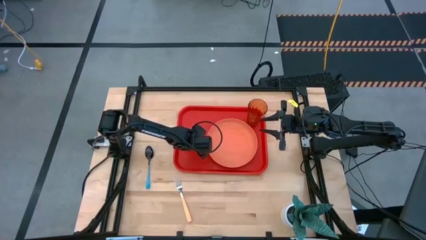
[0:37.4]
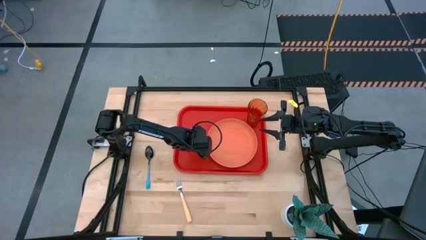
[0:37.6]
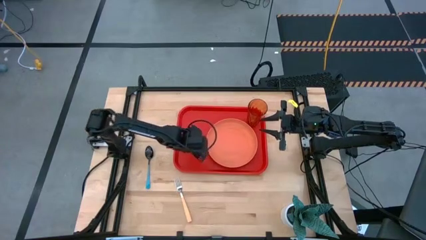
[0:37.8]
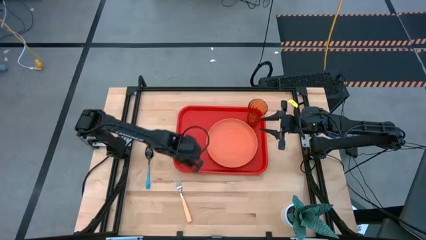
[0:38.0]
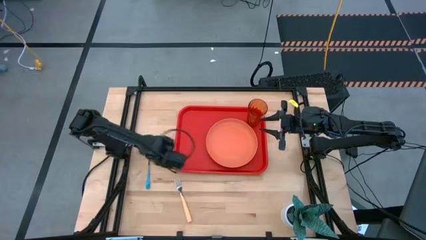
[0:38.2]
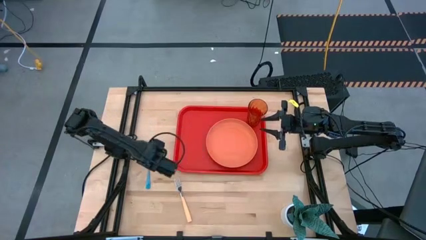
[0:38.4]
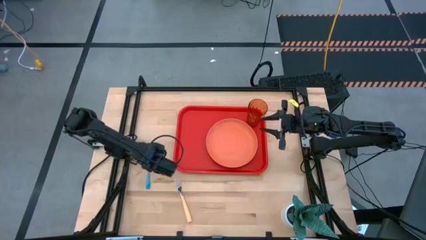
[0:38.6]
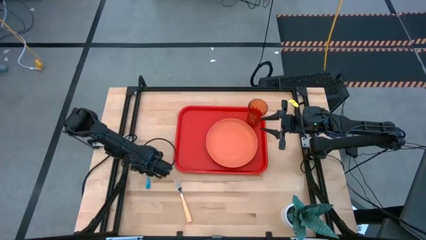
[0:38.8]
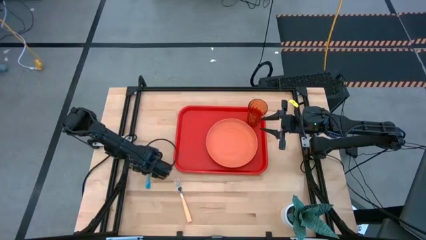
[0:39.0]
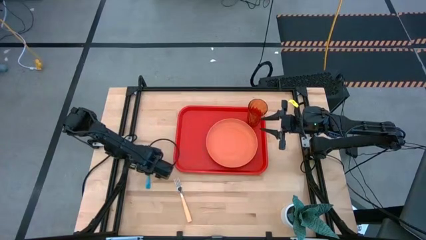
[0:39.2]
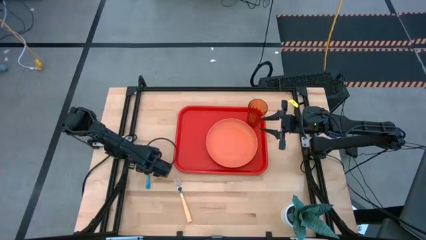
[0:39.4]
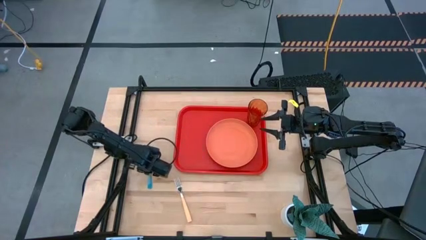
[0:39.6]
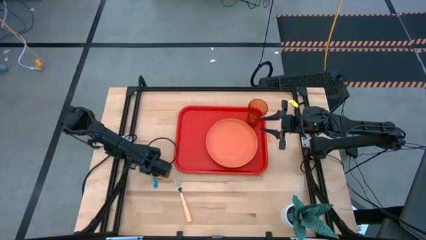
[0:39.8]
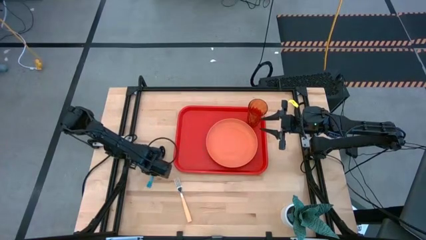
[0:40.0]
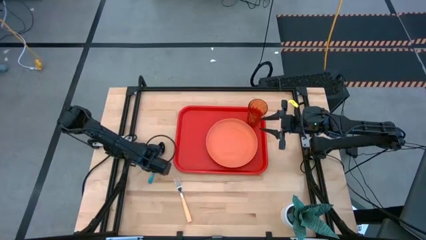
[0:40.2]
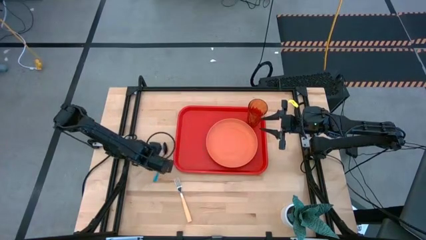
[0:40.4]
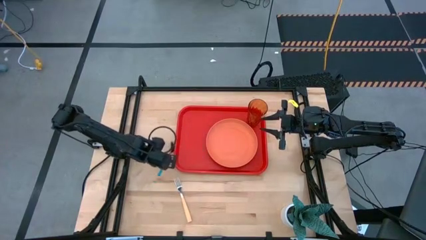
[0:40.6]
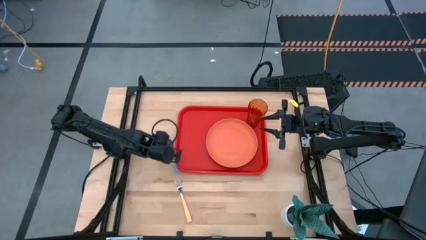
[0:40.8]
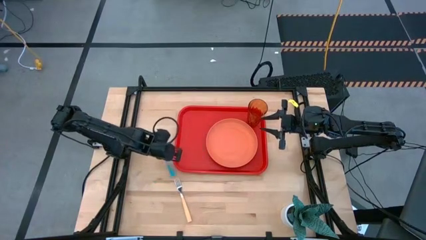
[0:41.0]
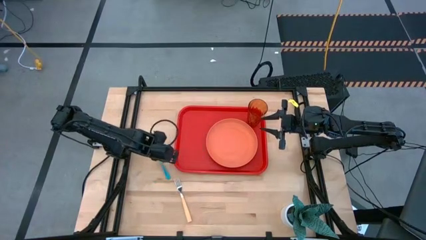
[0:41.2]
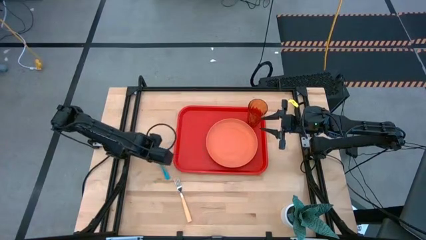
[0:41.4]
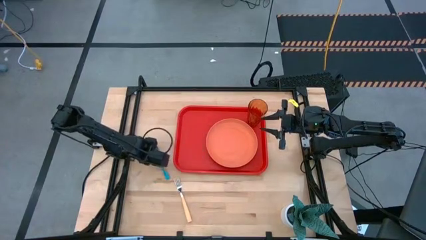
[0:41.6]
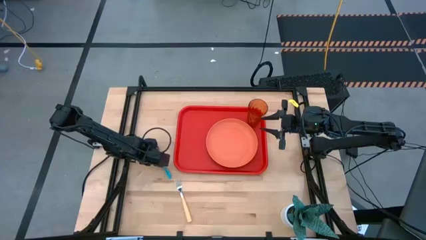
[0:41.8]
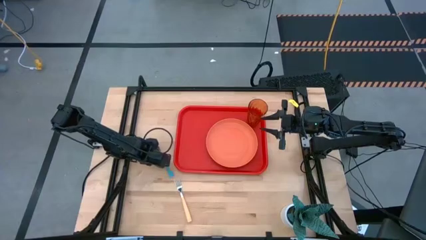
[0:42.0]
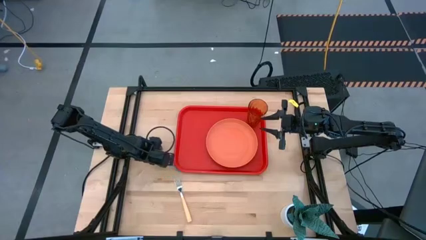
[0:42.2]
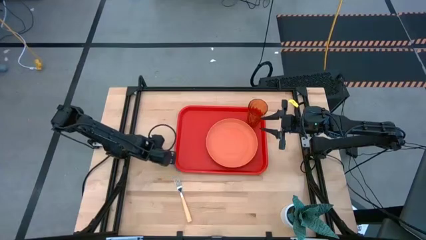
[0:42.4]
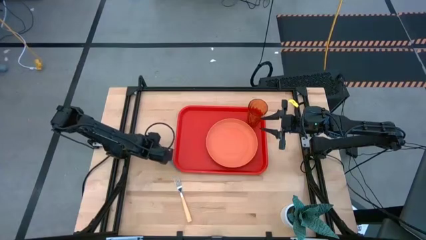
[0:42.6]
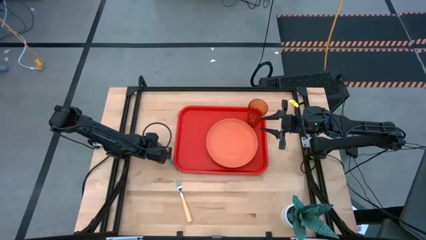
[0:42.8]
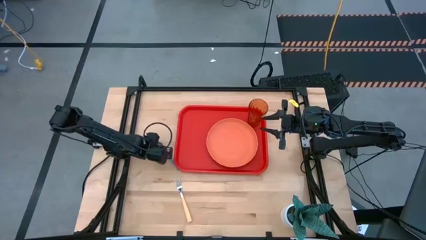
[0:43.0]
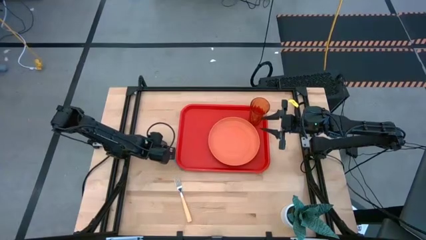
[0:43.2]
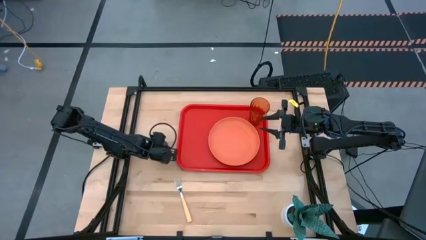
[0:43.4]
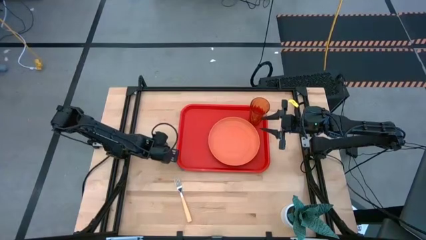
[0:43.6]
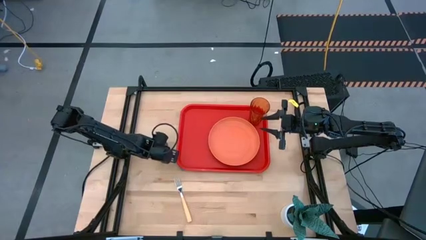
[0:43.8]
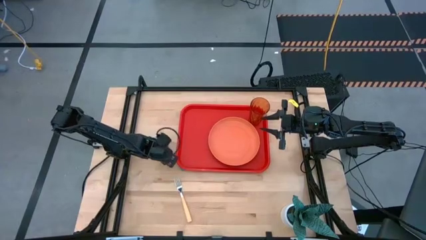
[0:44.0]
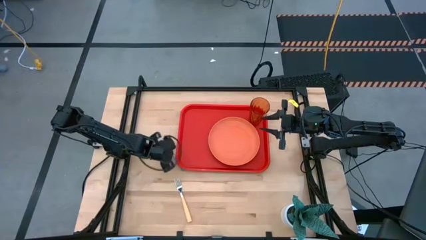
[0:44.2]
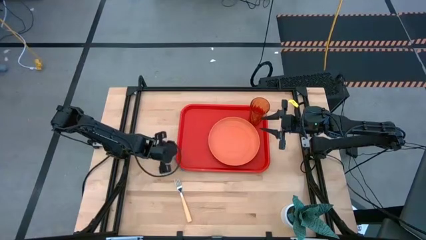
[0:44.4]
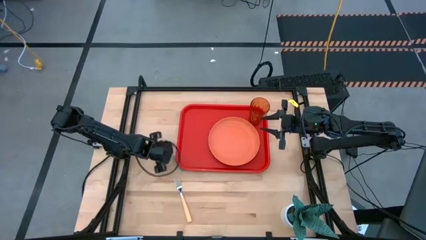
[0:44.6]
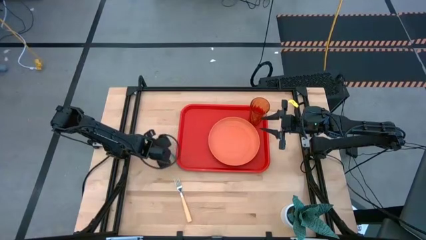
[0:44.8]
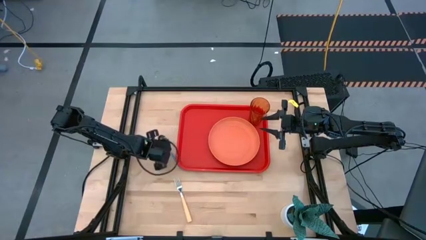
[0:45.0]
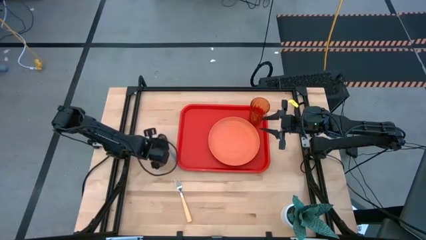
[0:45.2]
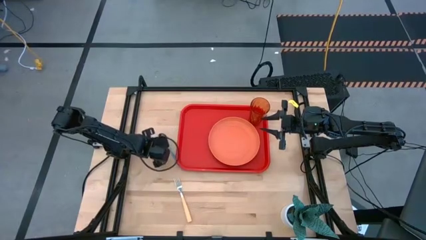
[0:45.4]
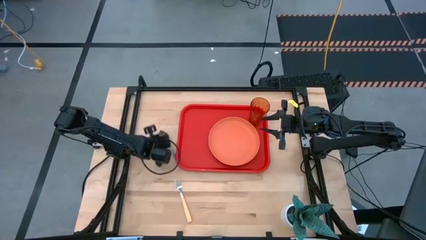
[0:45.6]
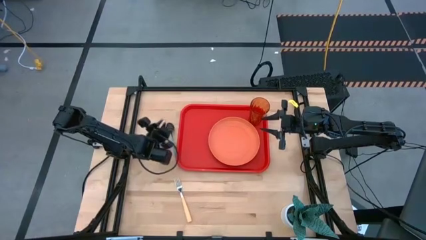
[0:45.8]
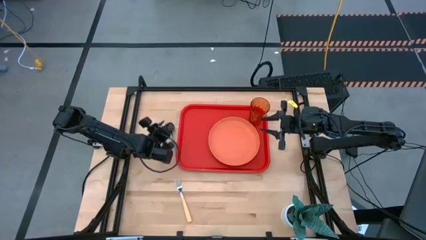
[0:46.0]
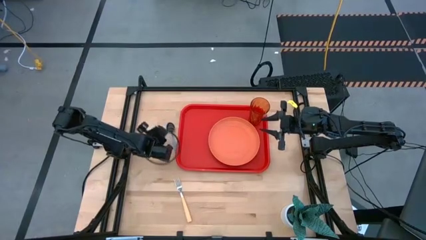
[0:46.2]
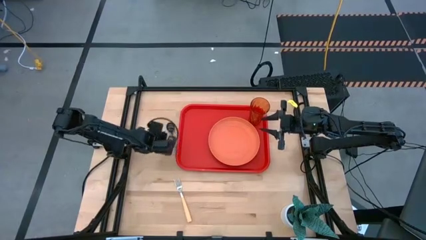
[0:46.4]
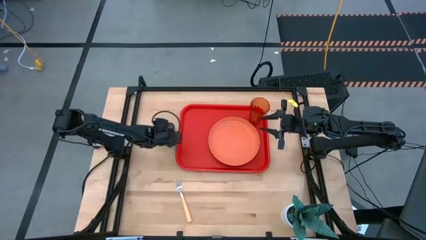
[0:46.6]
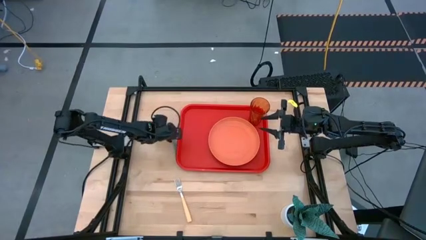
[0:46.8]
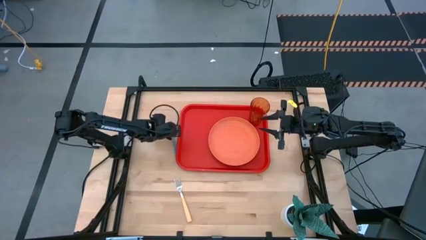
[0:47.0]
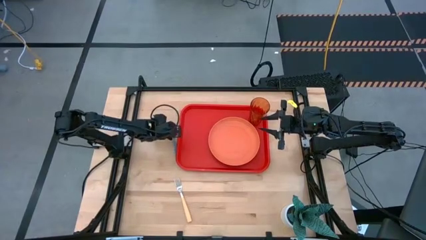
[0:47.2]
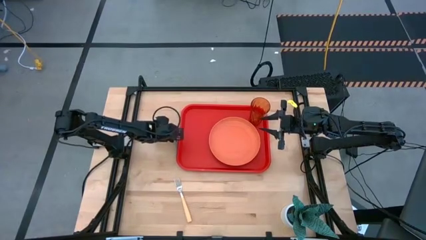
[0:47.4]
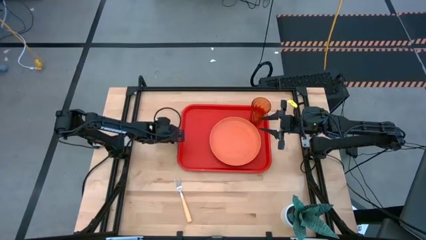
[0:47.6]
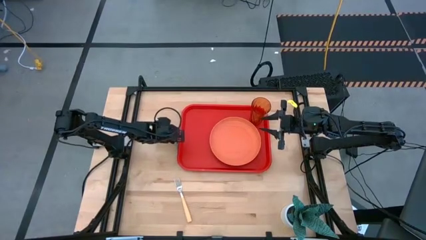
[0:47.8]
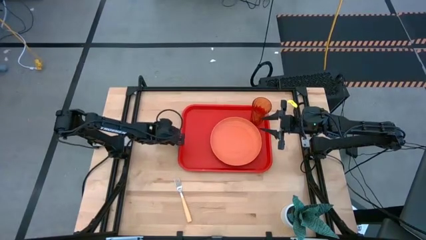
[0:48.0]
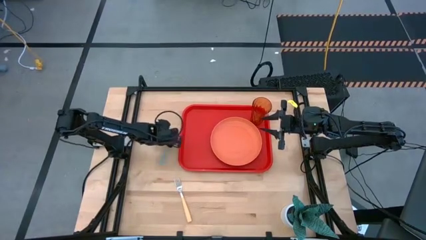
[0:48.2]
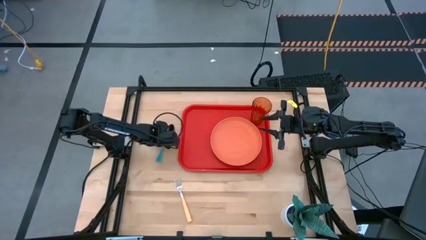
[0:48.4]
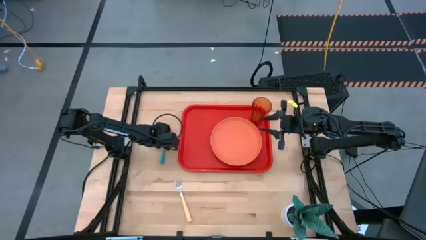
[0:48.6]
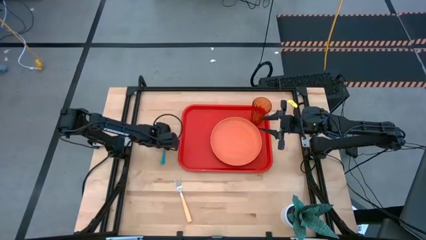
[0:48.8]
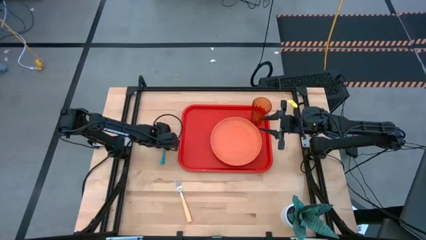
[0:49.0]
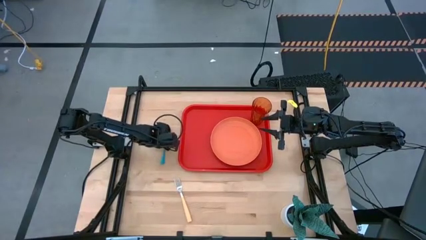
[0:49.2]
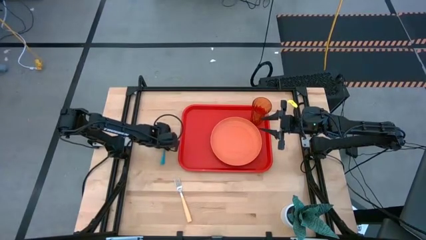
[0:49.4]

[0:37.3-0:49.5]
Task: Pick and place plate/cup/fork/spoon on tray
Put the blue spoon on the red tray to the left of the orange plate

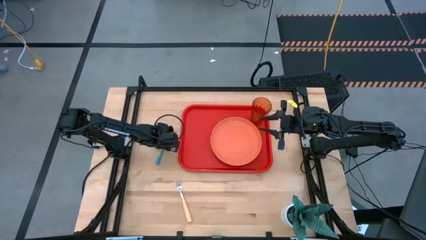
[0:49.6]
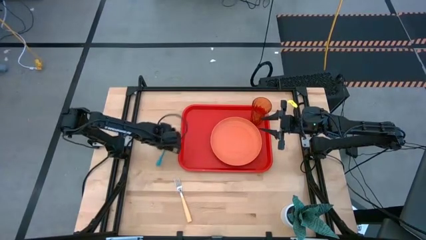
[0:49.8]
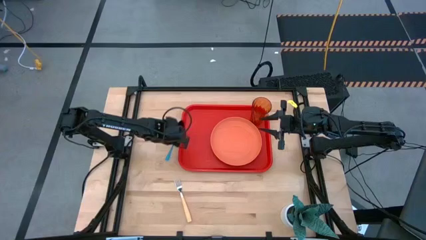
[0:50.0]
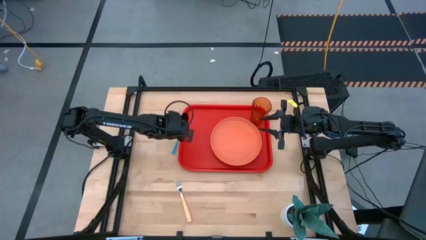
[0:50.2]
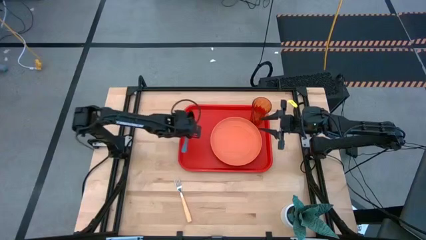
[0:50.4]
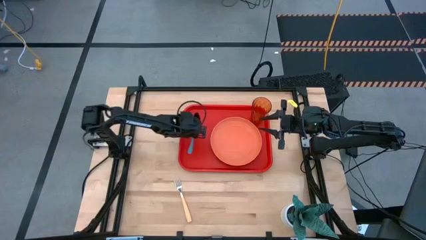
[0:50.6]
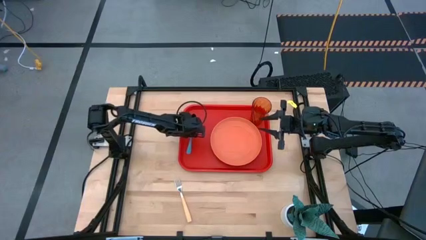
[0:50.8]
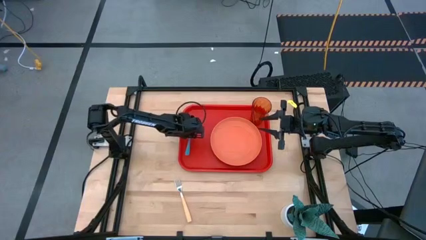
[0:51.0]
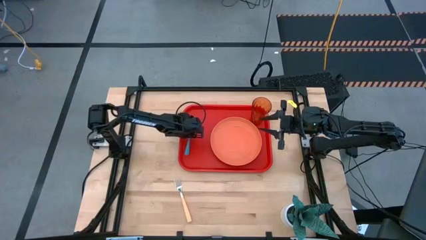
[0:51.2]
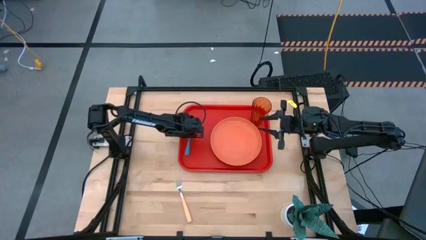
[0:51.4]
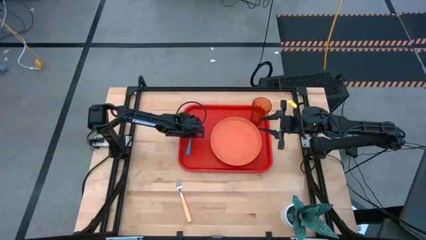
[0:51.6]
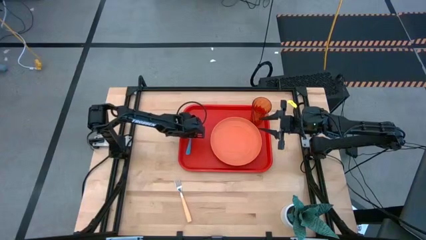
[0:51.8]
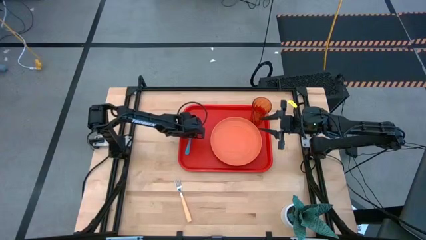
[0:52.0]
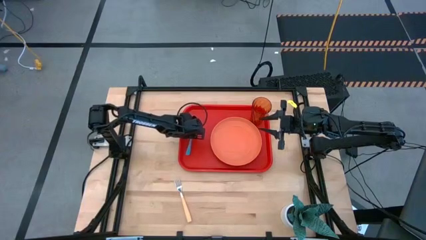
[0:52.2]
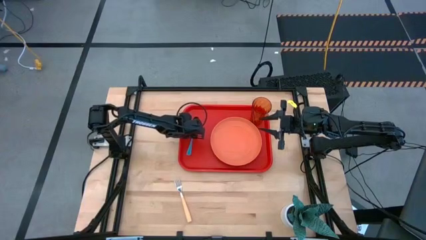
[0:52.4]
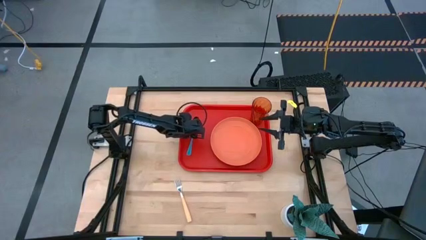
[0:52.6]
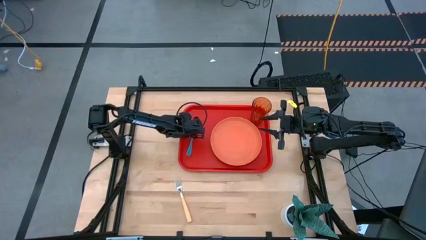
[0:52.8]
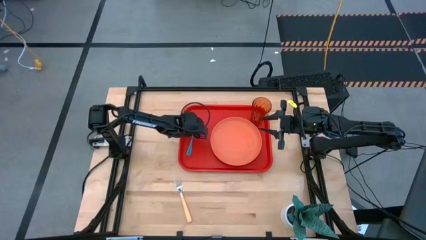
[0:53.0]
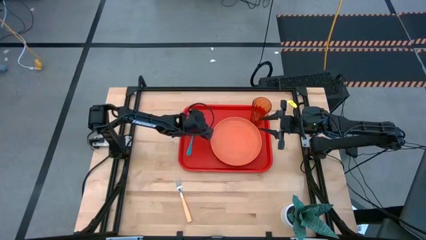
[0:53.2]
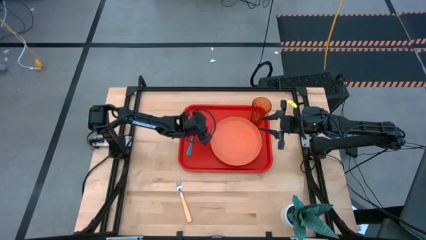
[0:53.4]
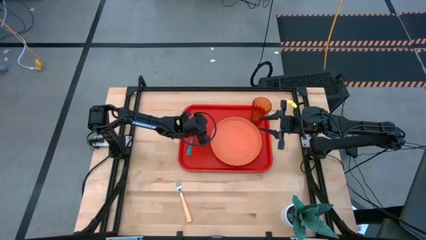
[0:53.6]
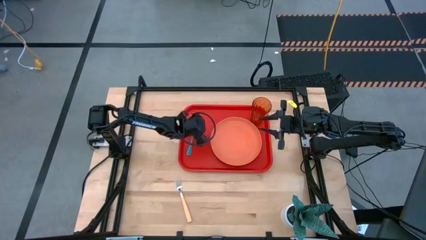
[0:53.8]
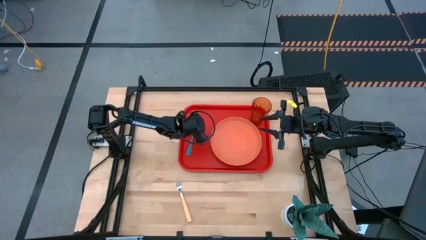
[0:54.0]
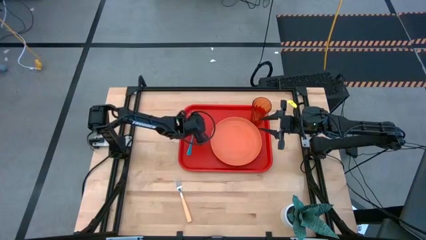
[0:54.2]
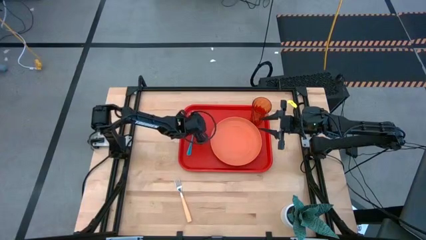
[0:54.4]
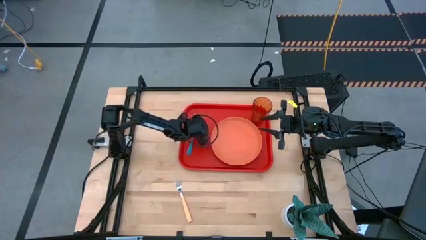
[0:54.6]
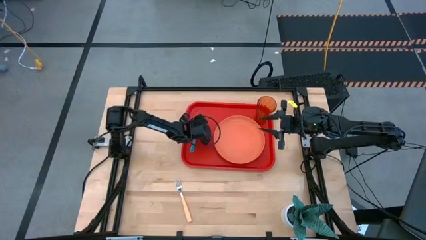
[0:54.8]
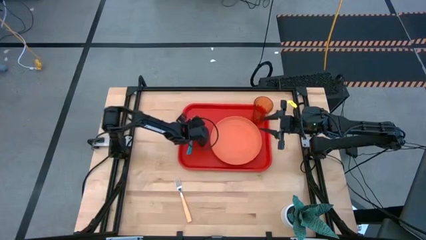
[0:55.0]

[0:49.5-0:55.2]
Put the blue spoon on the red tray to the left of the orange plate
